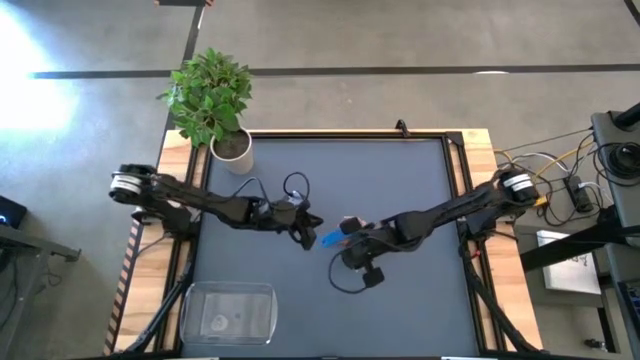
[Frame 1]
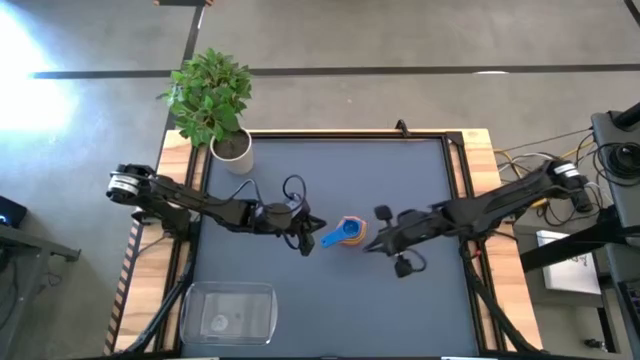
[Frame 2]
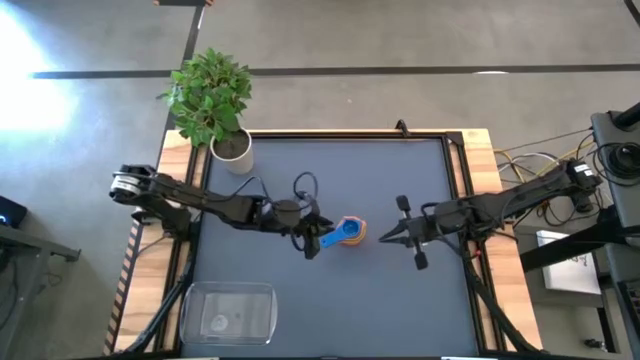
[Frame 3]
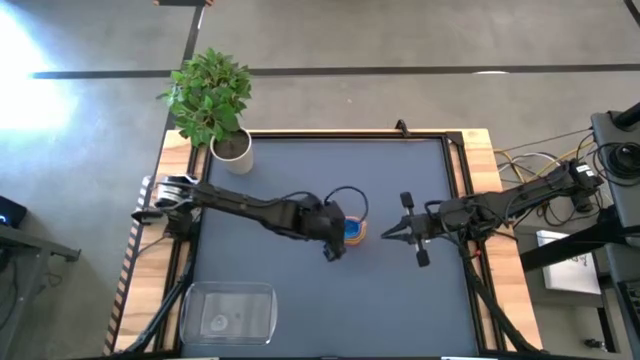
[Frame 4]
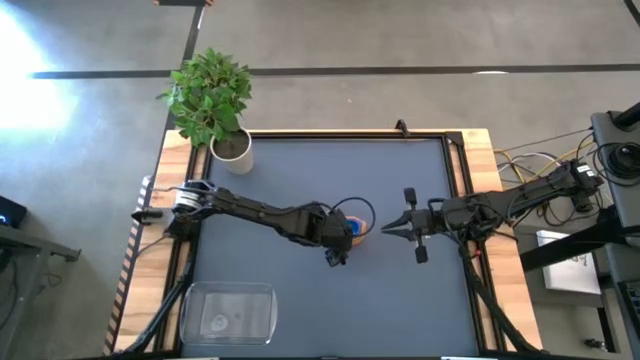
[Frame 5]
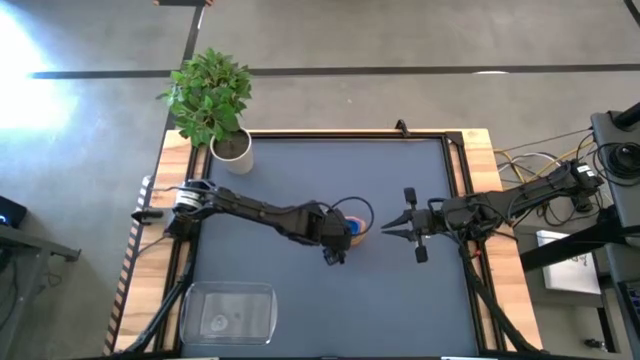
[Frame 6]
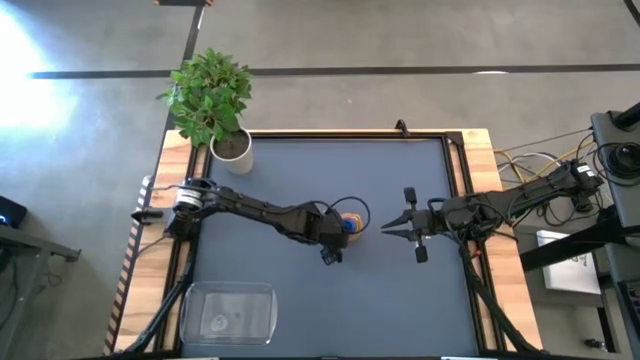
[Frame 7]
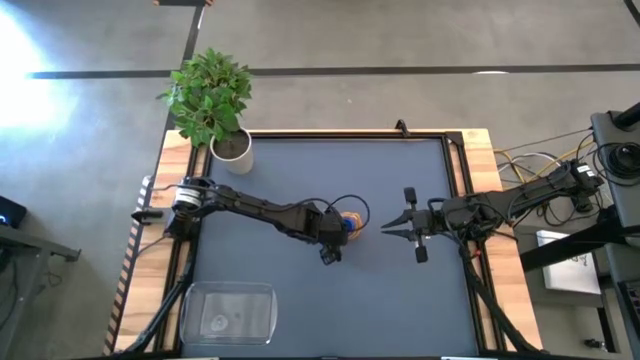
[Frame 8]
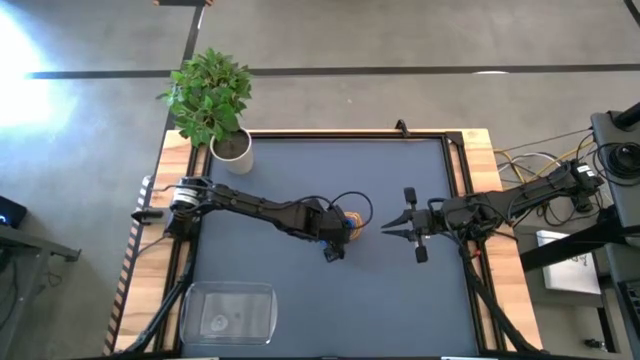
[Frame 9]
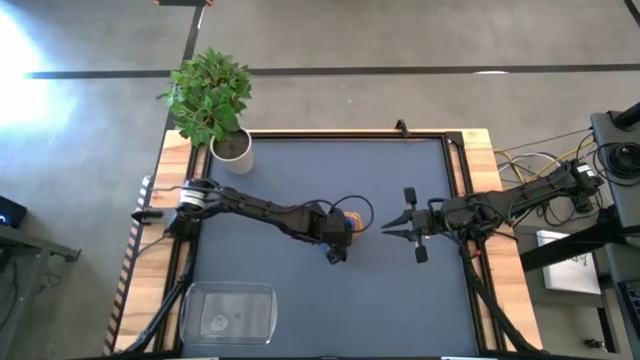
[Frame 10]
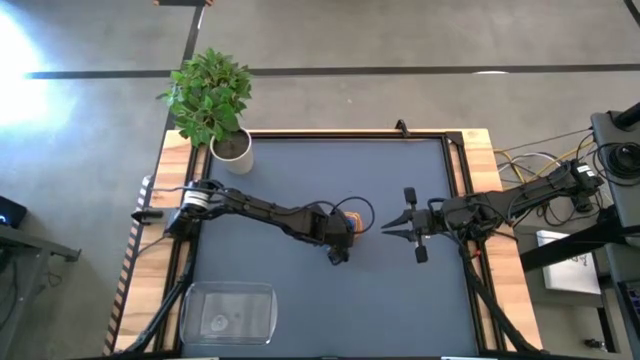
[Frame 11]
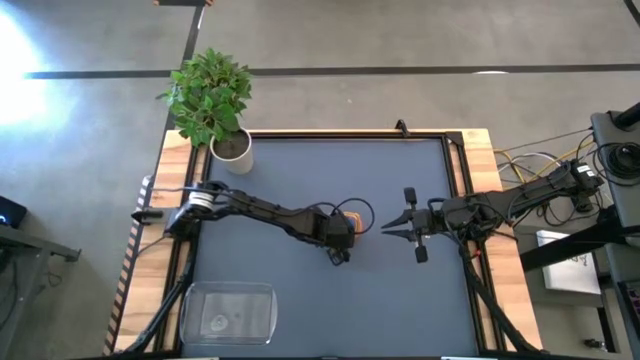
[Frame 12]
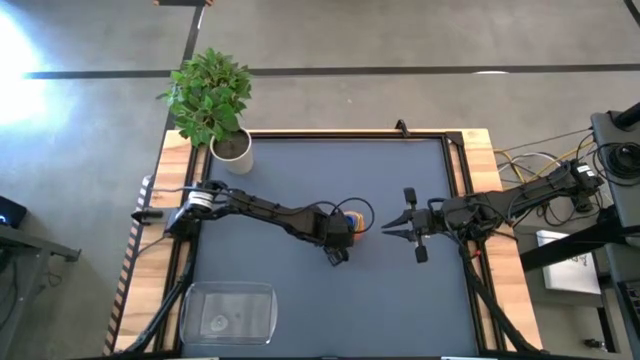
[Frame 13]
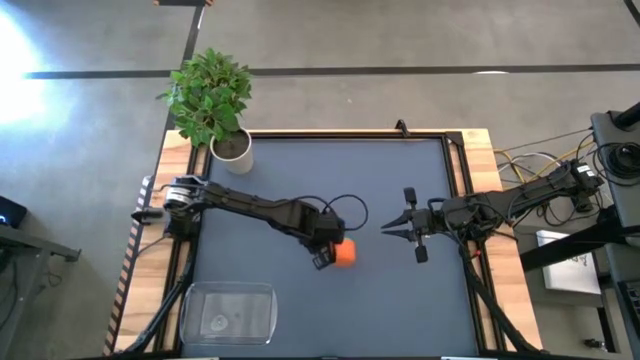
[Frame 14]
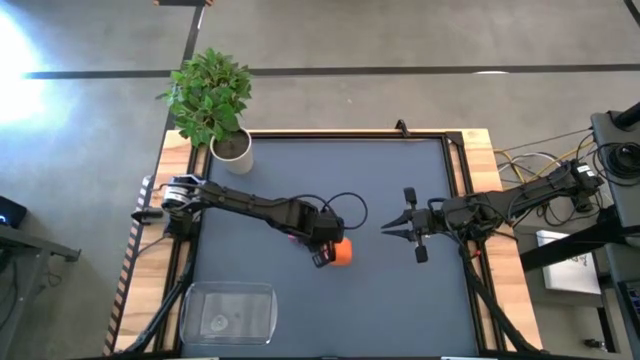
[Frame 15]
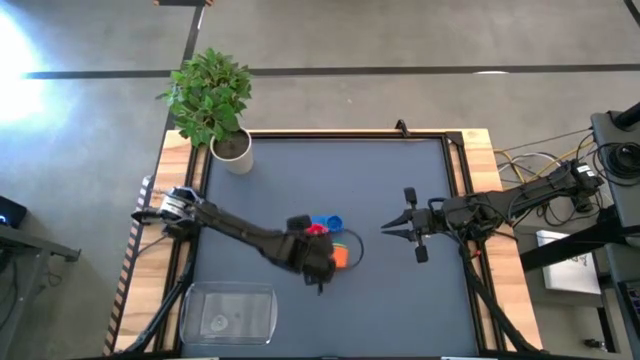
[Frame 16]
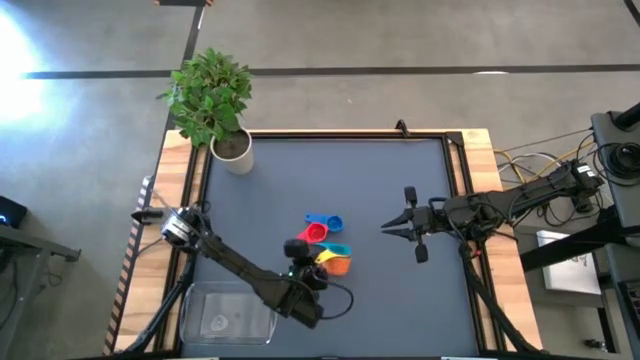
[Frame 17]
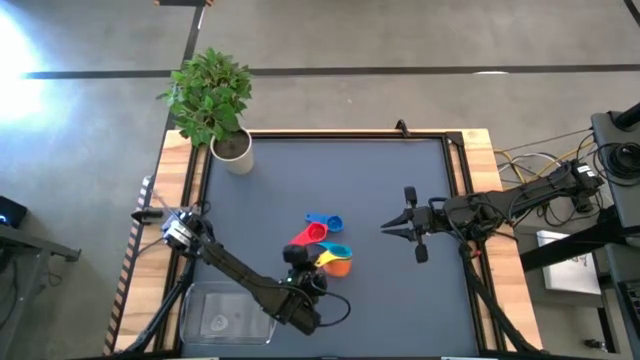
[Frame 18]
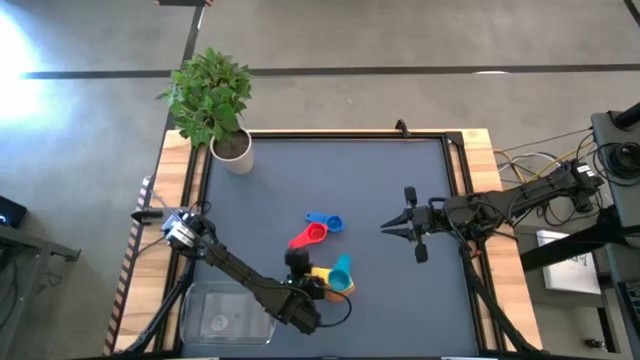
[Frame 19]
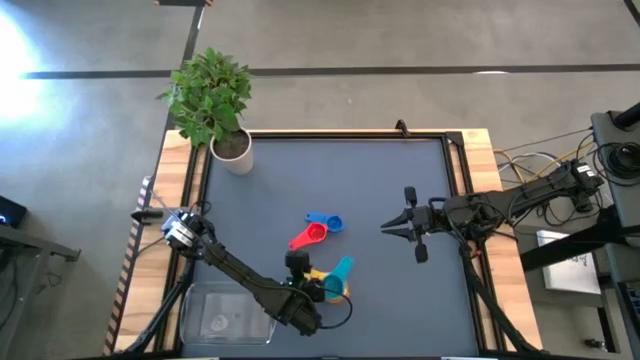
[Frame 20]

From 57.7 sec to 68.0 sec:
Task: Nest measuring cups in basket
Put the stacked measuring cups into the bin

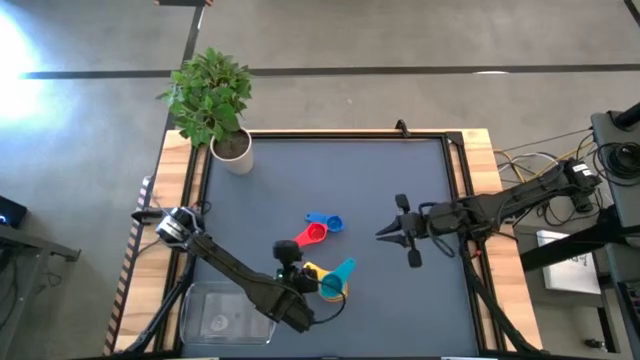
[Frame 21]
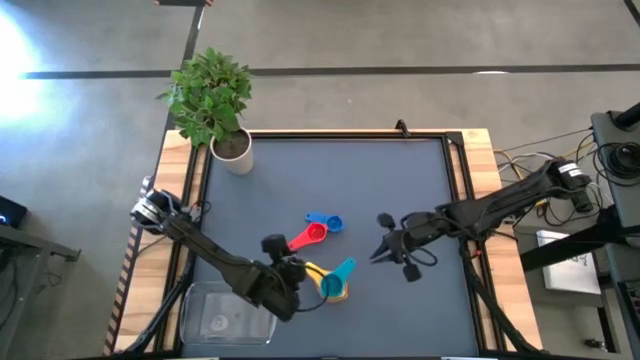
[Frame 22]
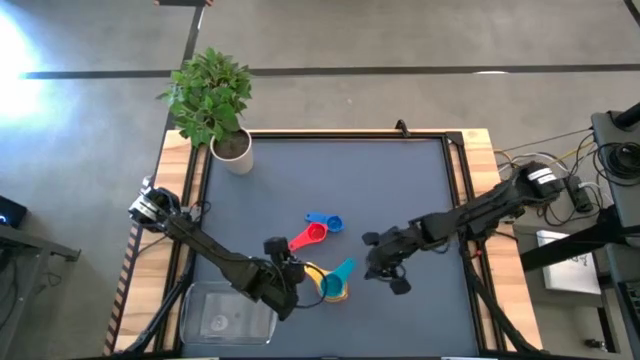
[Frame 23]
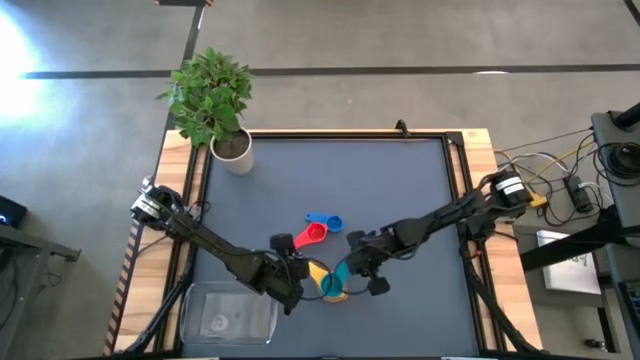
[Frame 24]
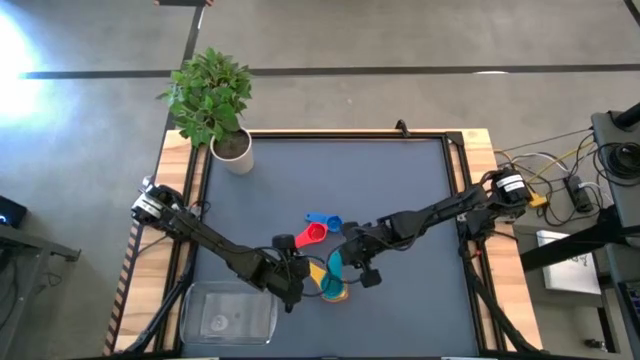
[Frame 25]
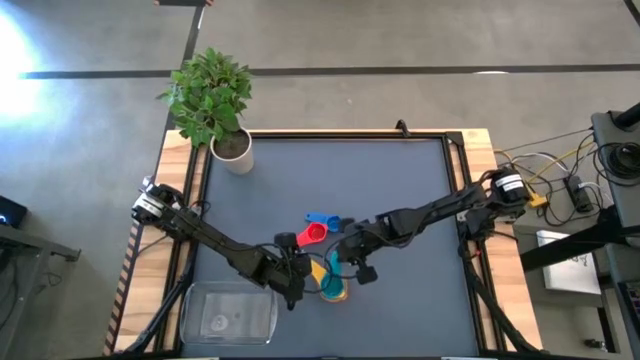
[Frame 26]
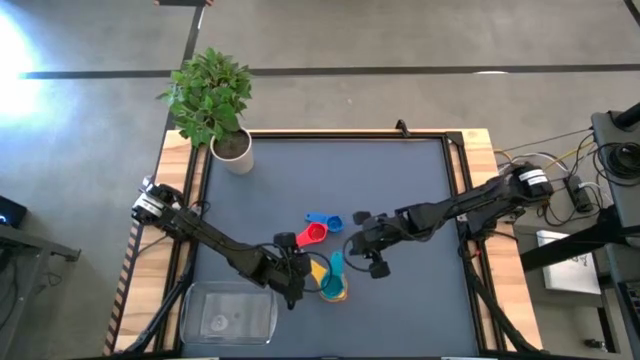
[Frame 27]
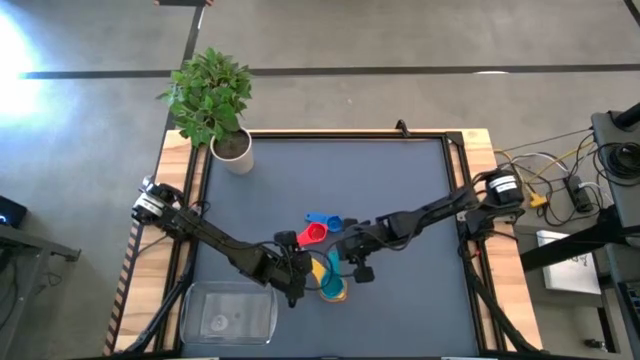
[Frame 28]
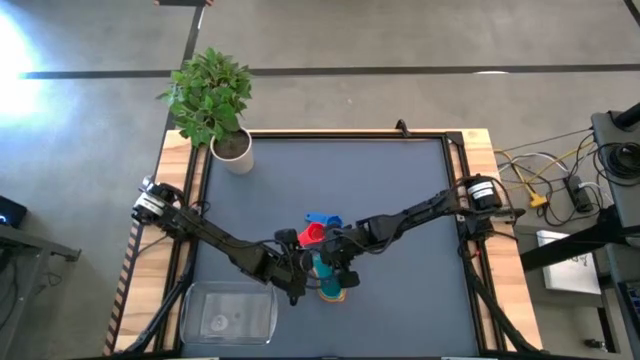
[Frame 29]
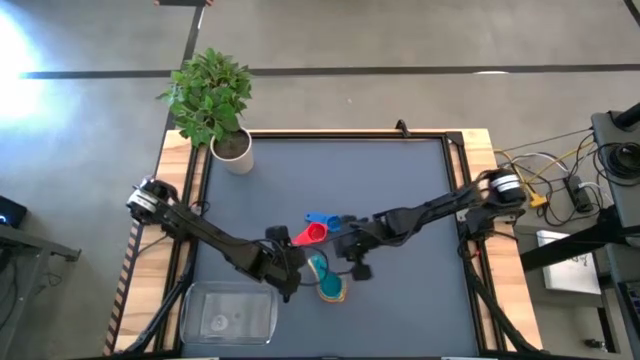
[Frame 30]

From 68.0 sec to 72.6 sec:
Adjust the measuring cup to align

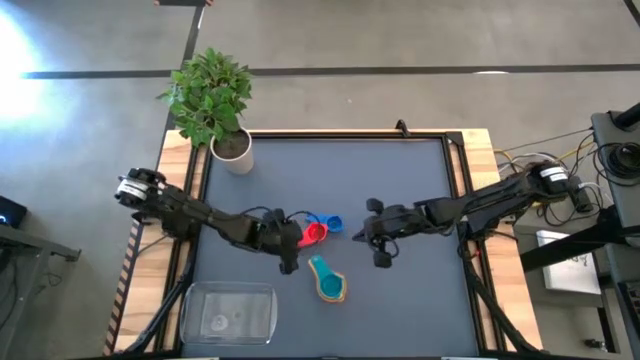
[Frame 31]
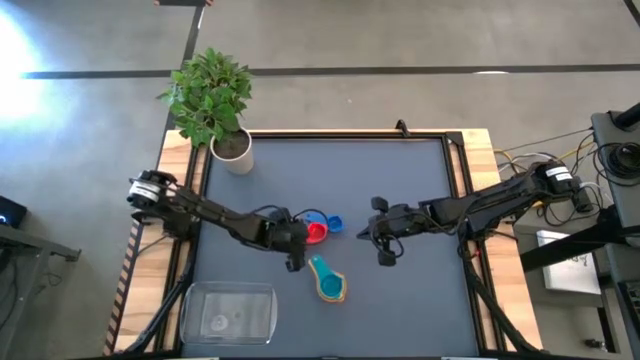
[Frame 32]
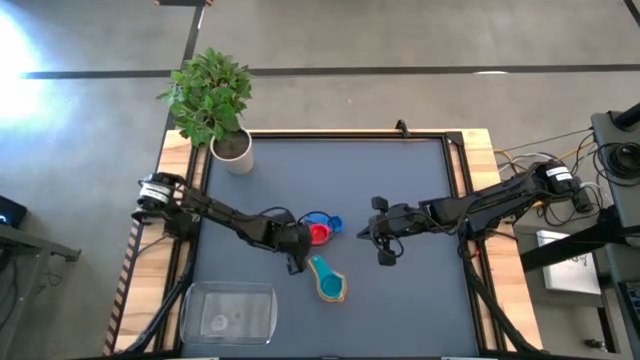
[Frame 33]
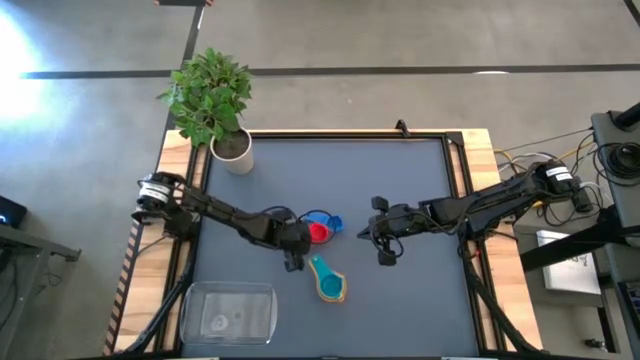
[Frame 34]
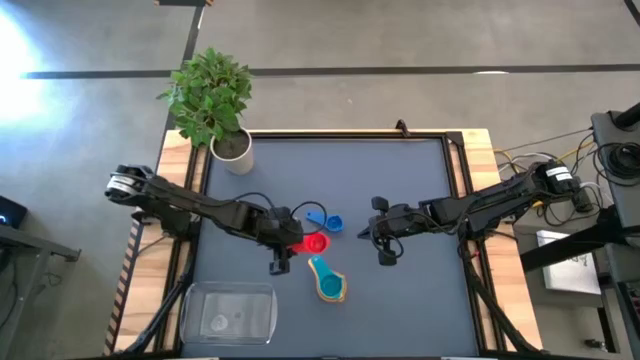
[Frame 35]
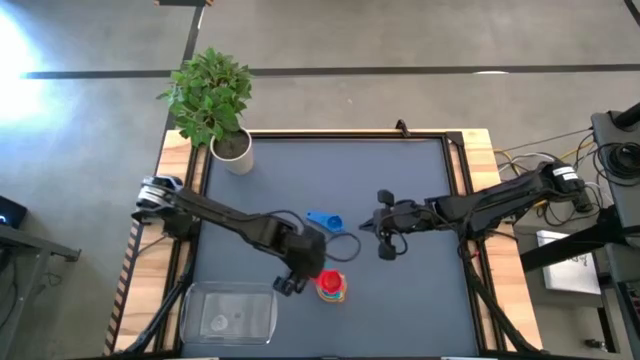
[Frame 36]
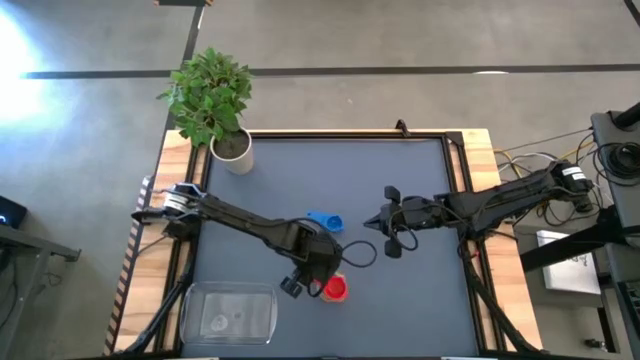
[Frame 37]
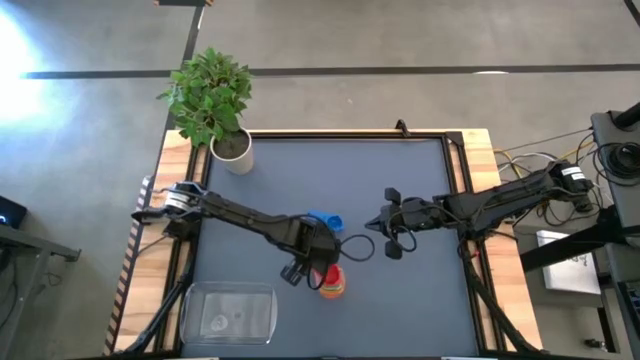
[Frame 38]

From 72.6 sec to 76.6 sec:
Stack the red measuring cup into the light blue measuring cup

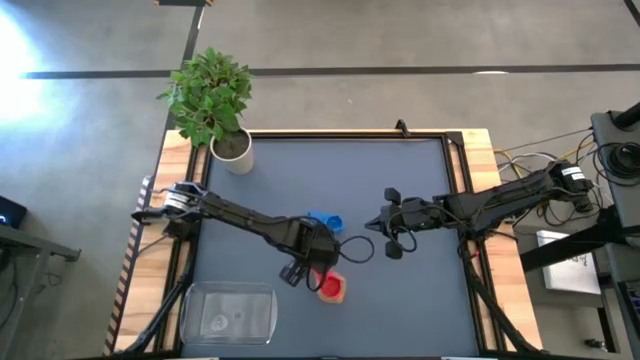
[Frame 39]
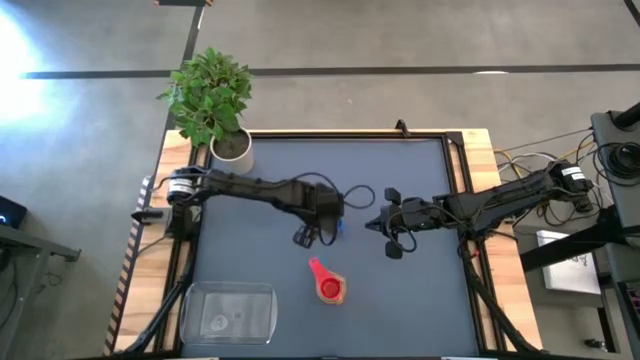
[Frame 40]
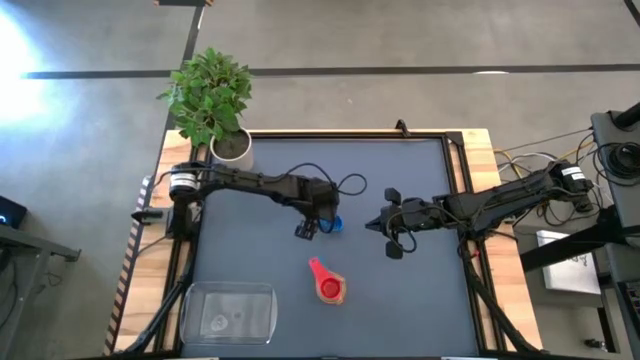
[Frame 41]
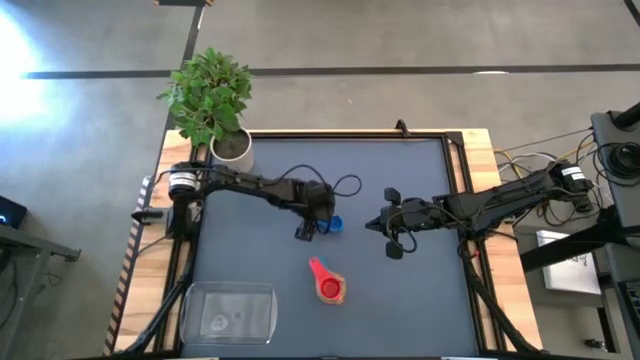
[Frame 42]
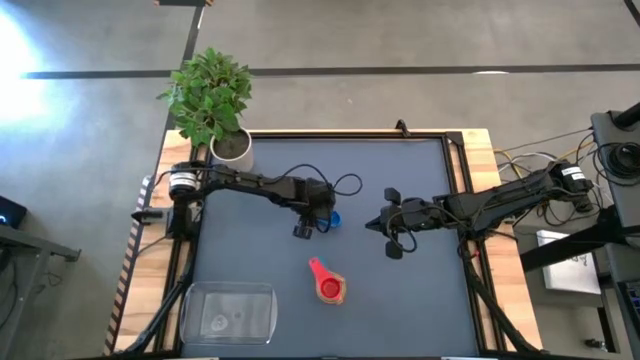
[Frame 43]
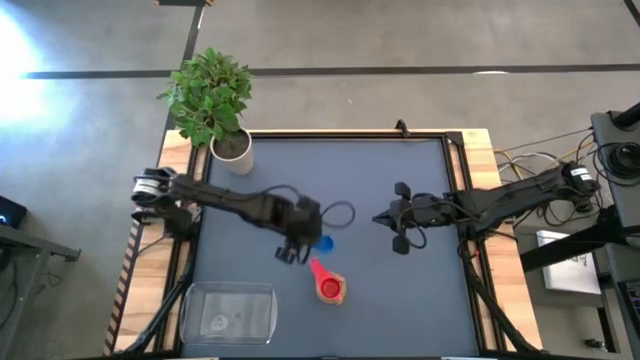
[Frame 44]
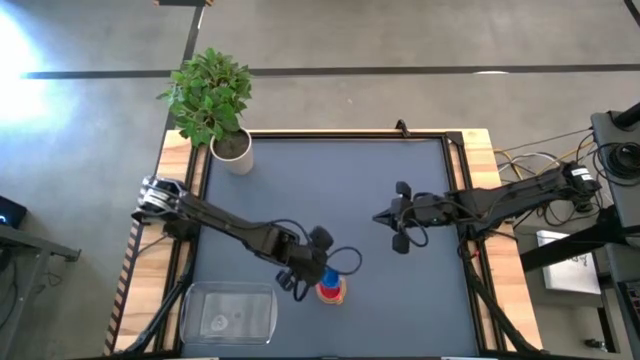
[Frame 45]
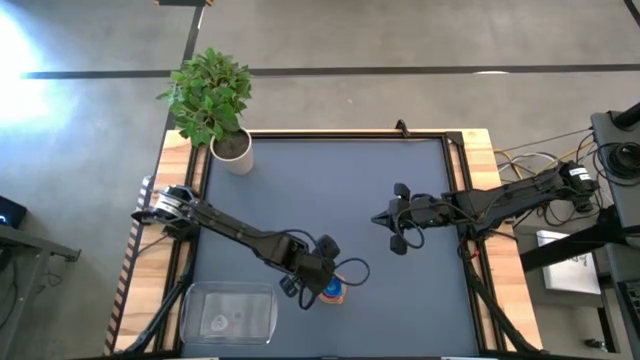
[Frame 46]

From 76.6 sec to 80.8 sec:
Stack the blue measuring cup into the red measuring cup
